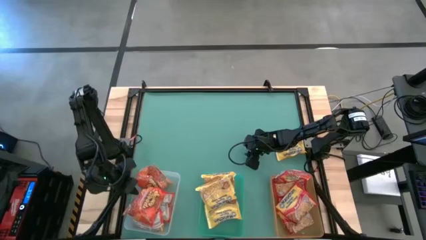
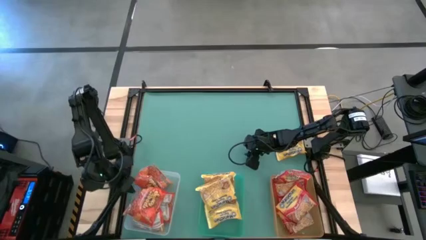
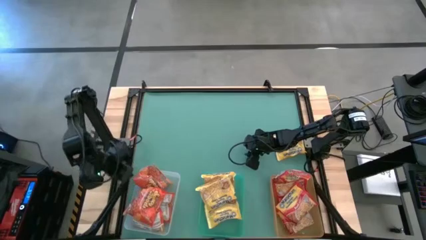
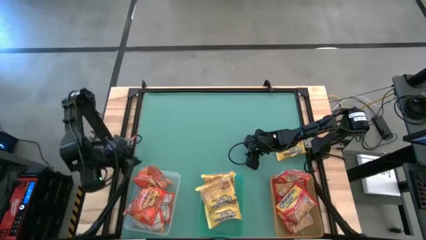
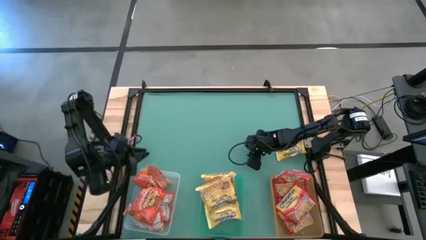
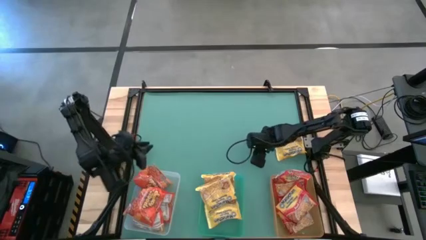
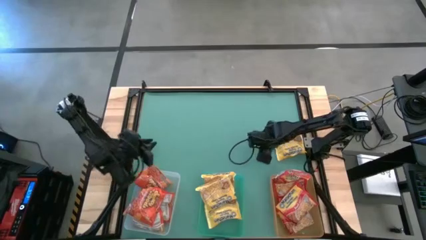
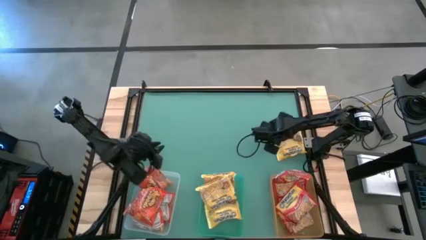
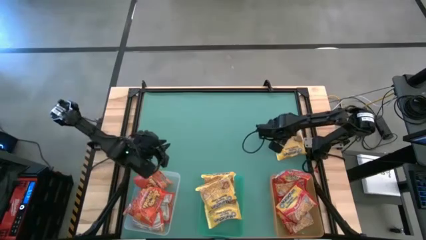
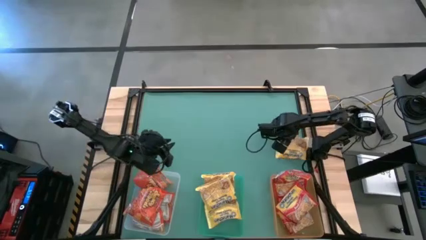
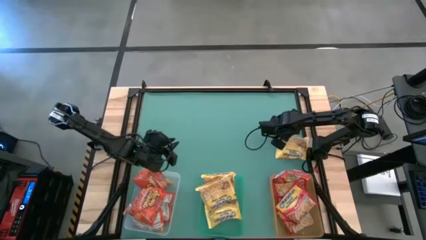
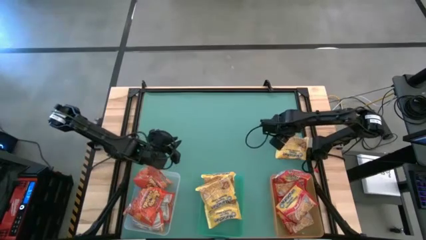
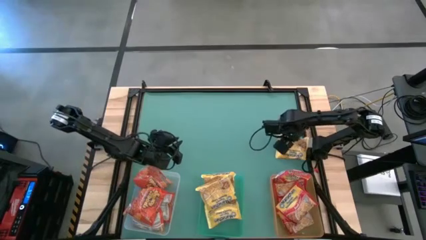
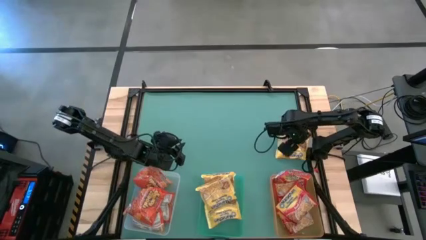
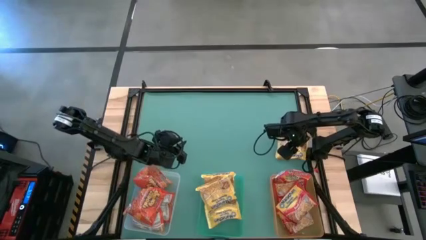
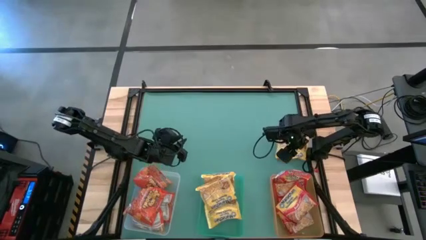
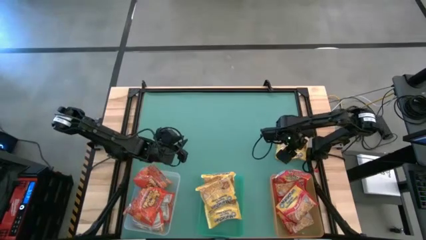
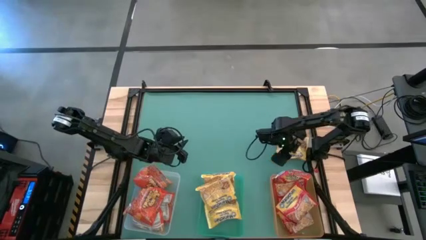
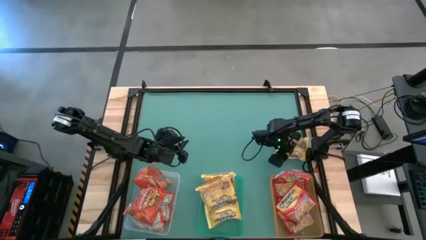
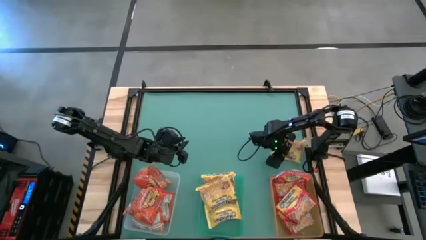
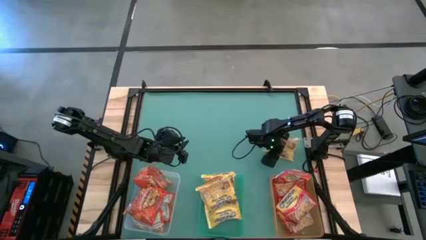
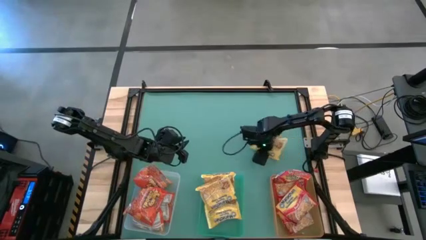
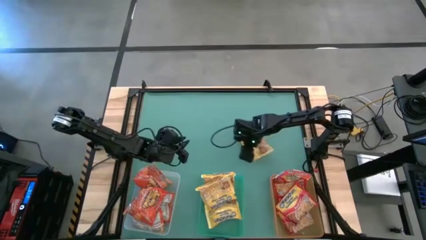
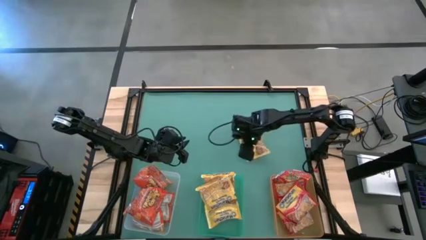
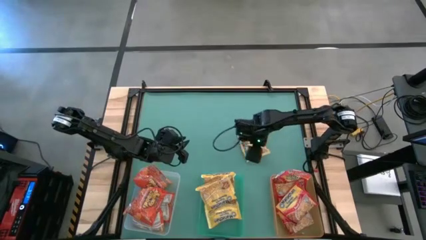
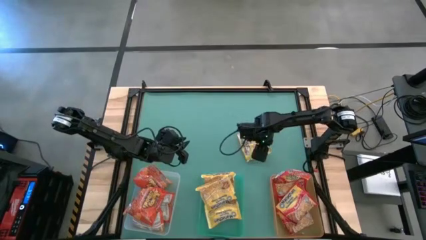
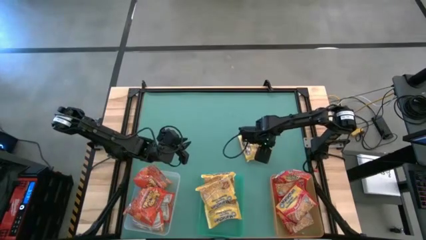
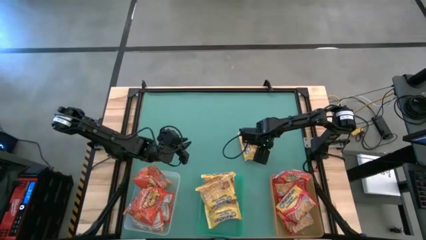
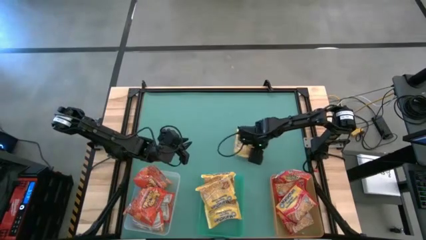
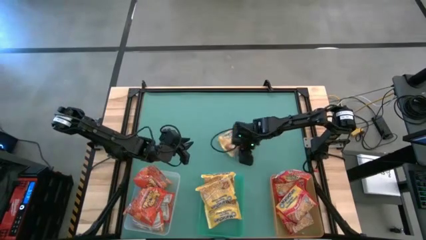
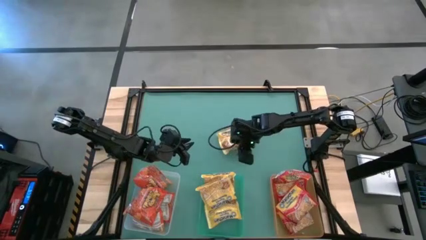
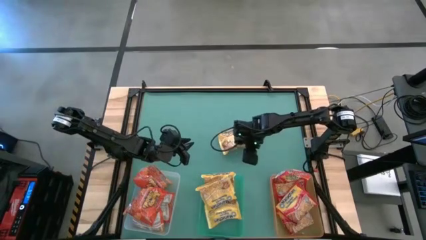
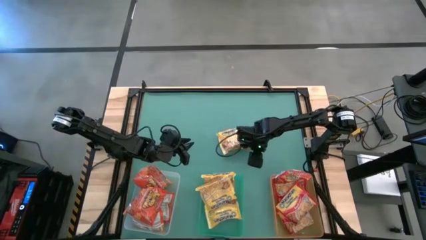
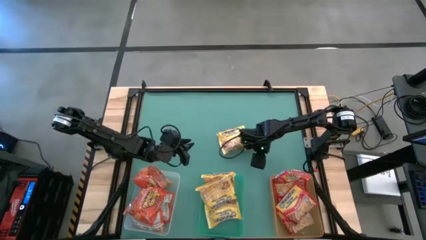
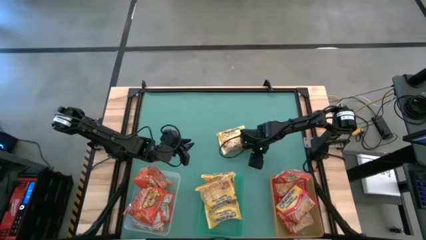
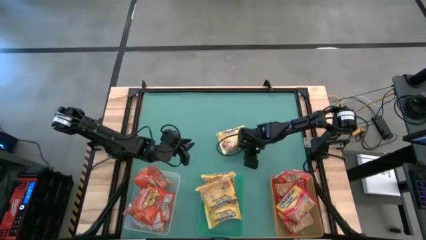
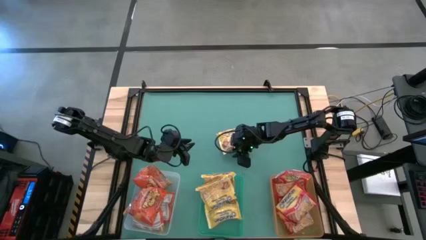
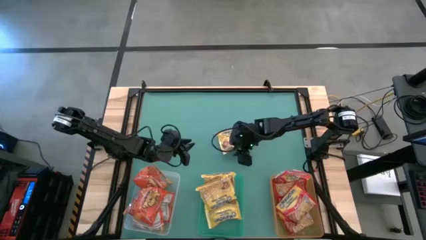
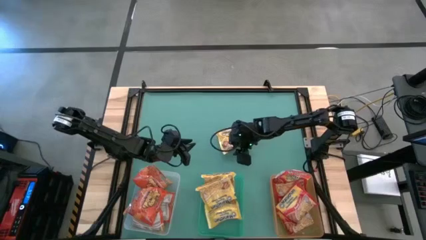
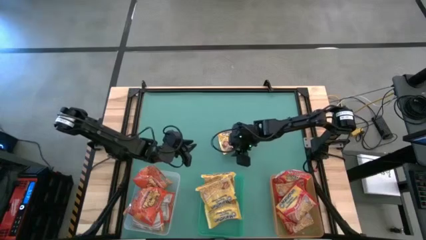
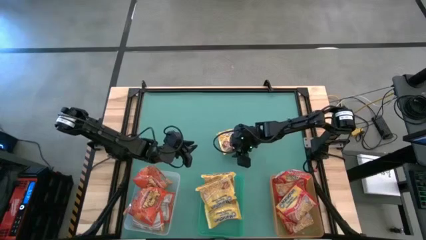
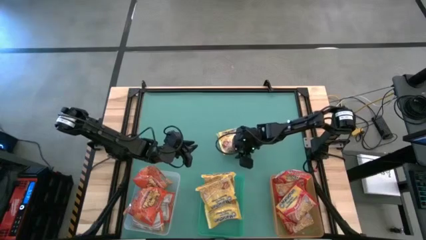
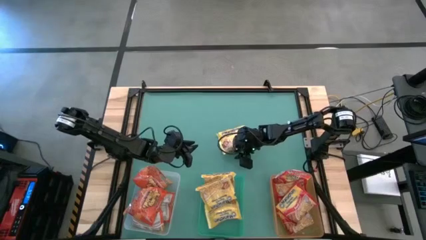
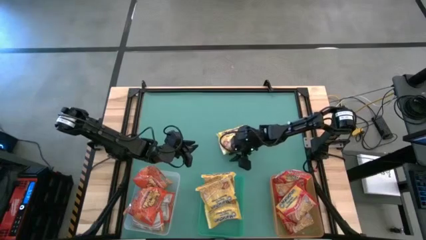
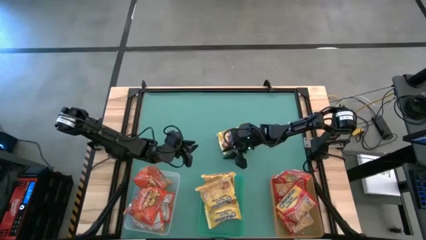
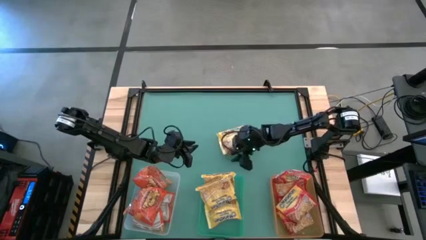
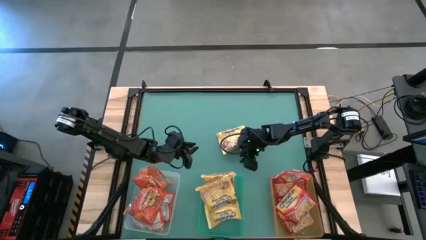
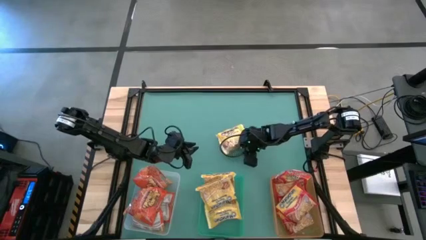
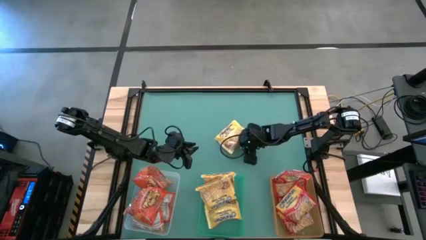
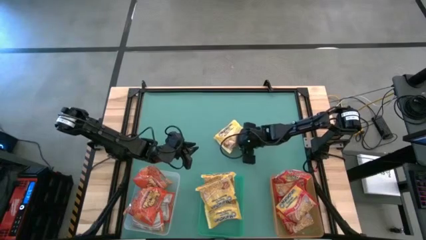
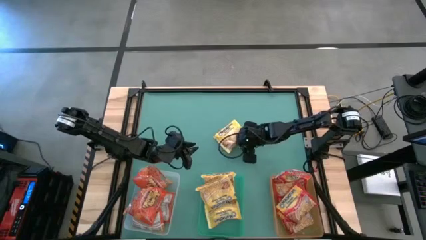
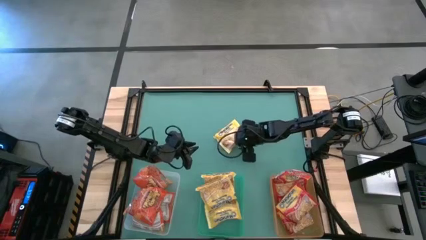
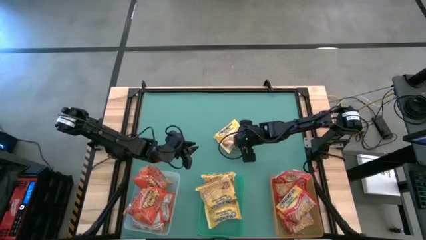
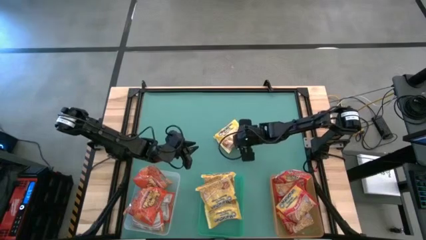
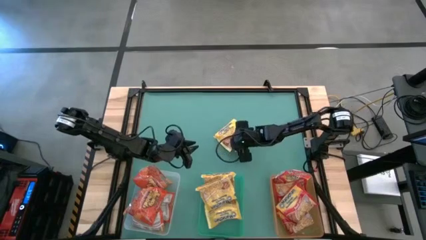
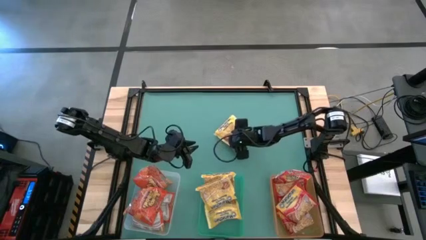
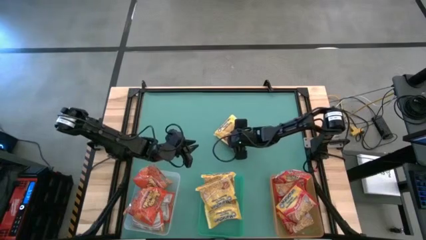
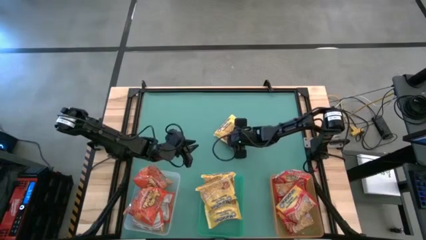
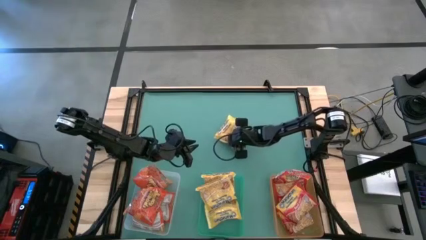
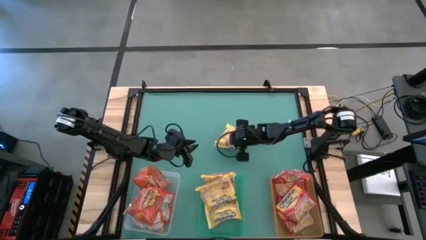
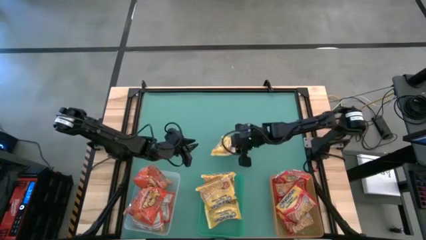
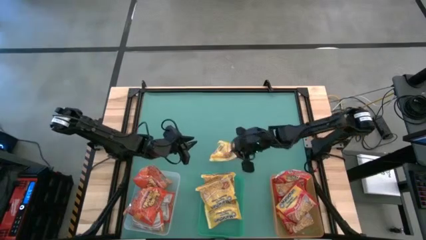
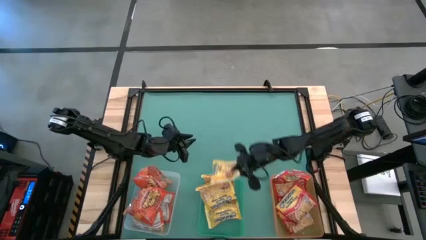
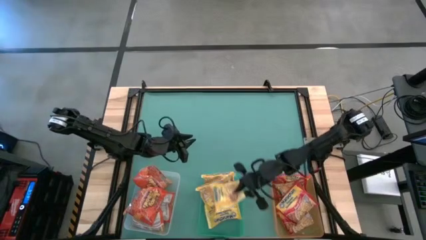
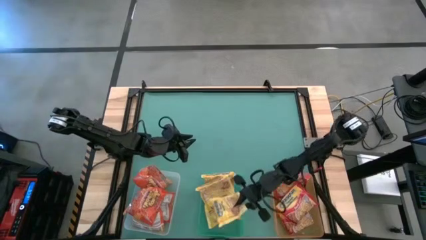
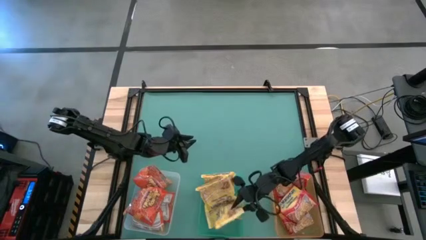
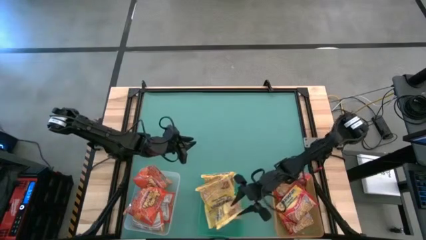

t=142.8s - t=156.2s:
Task: Sort Maruchan noodles
Put the yellow noodle pack into the green bin

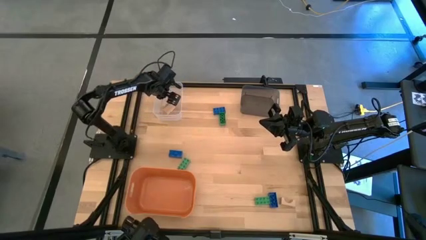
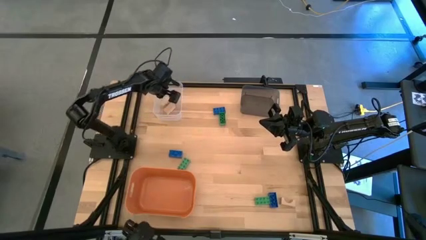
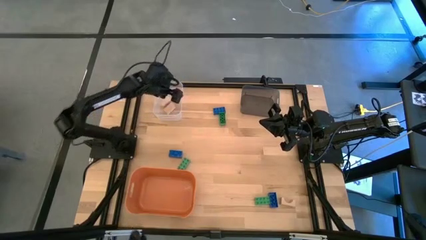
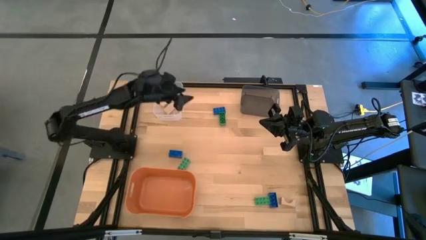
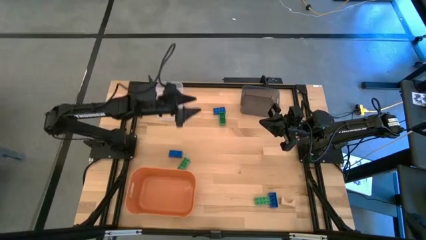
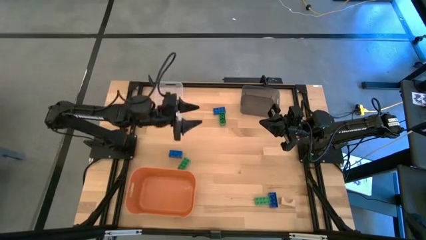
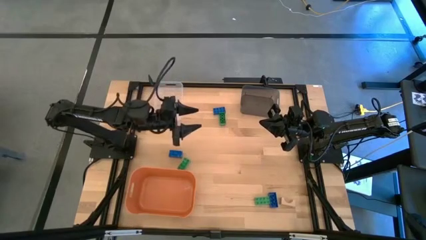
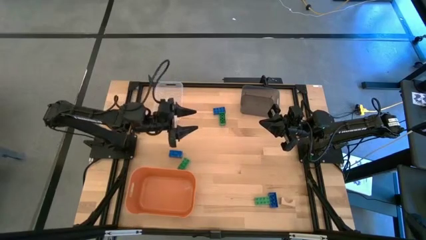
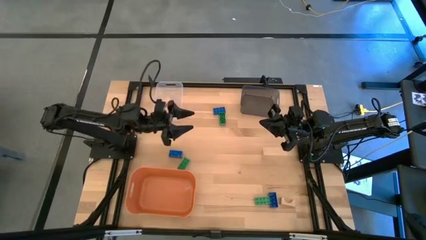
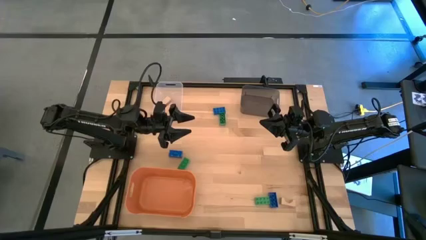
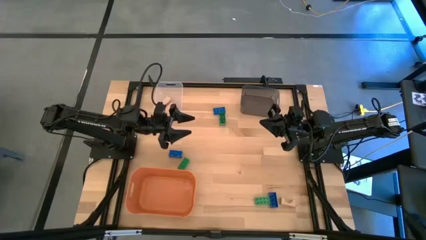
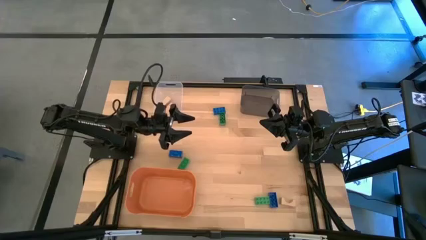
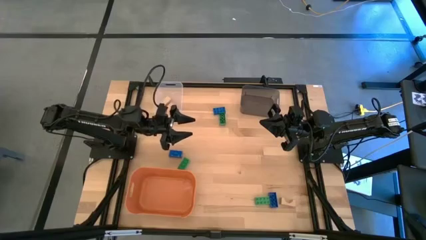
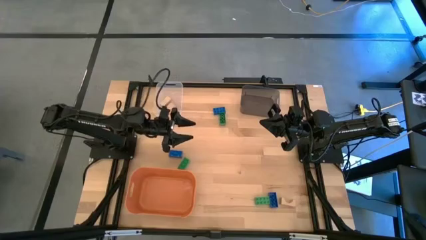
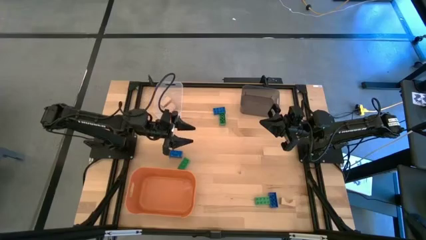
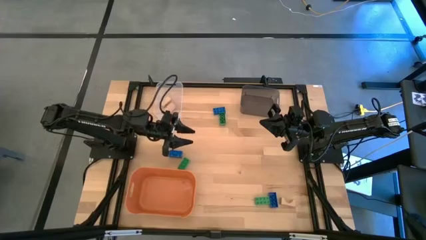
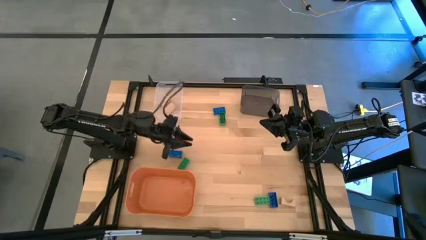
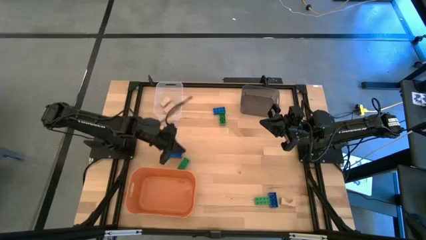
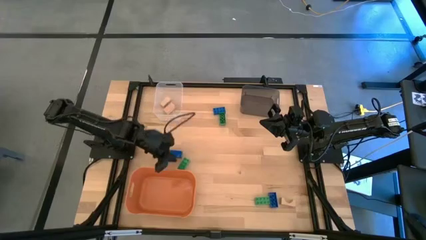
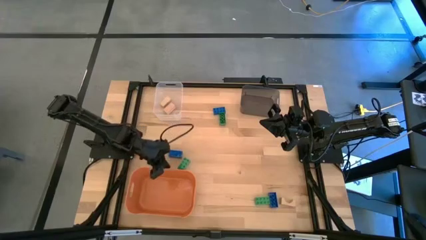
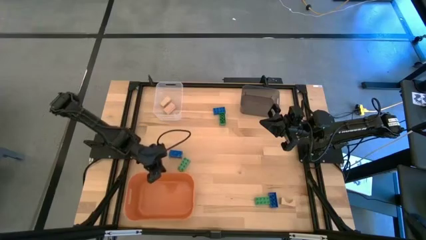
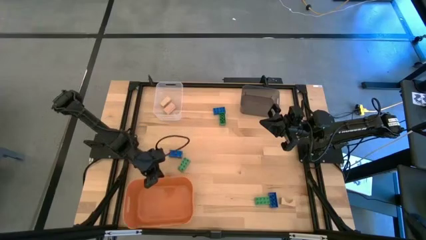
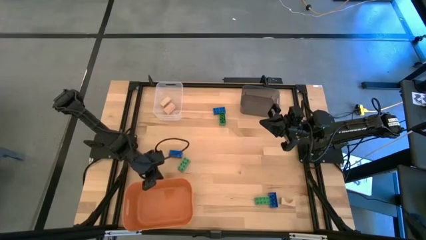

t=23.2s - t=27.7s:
Task: Sort & place blocks by color
Adjust the orange bin
